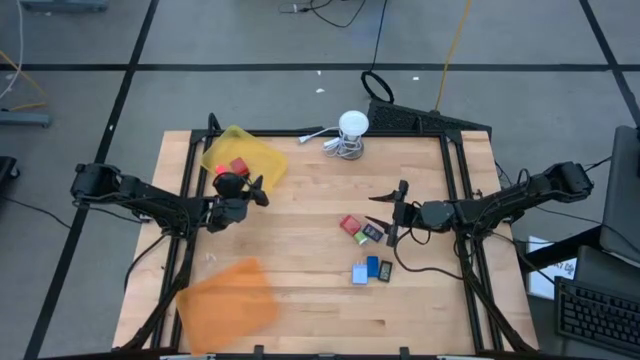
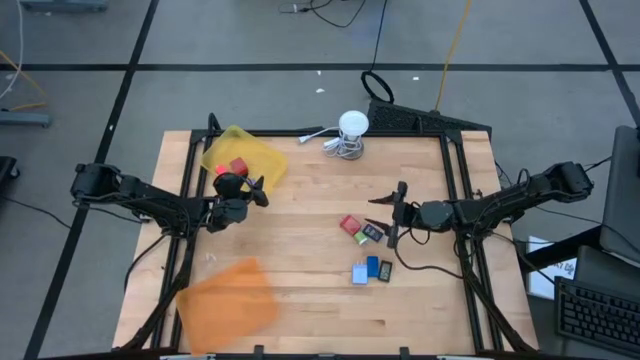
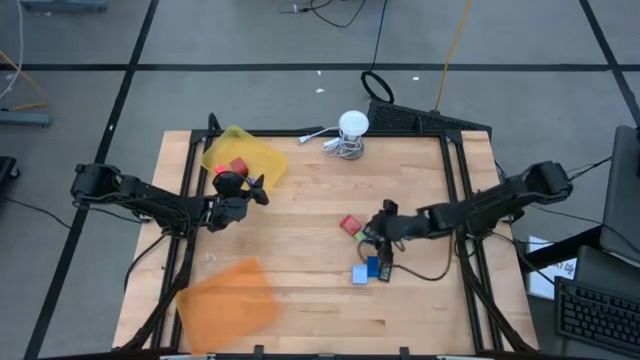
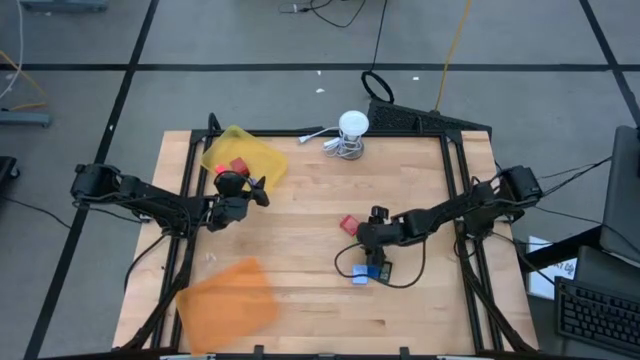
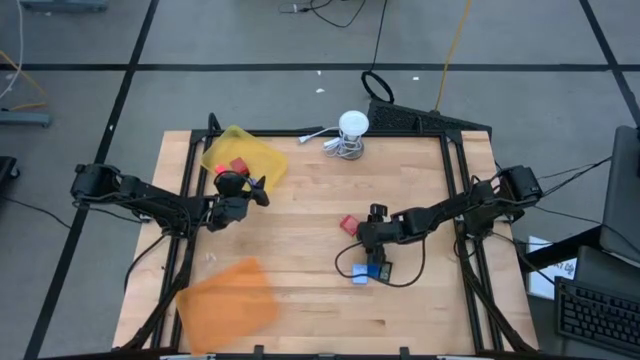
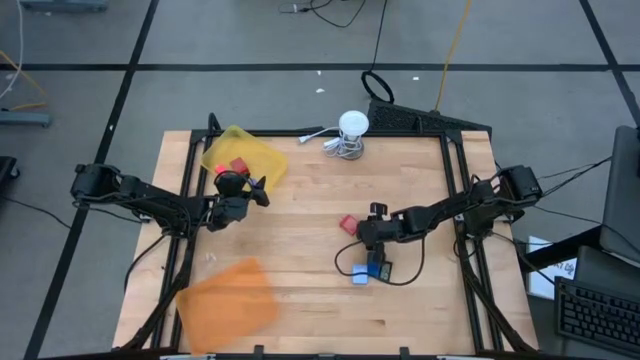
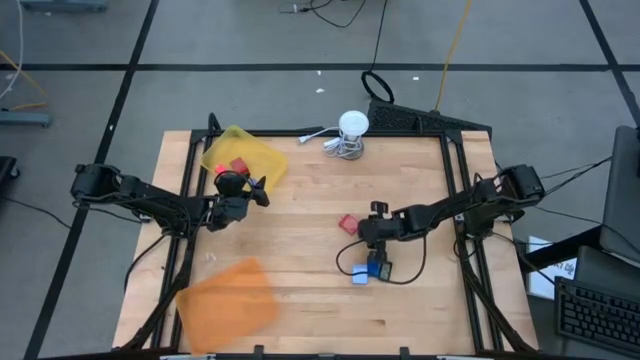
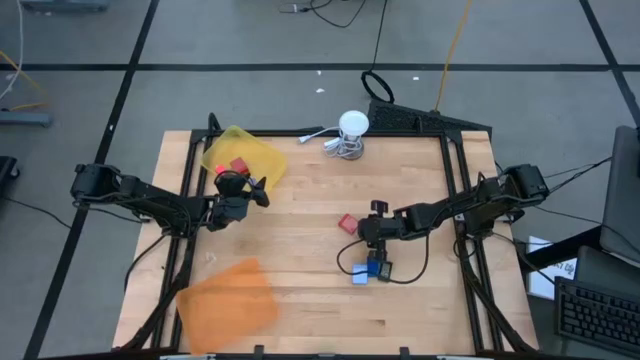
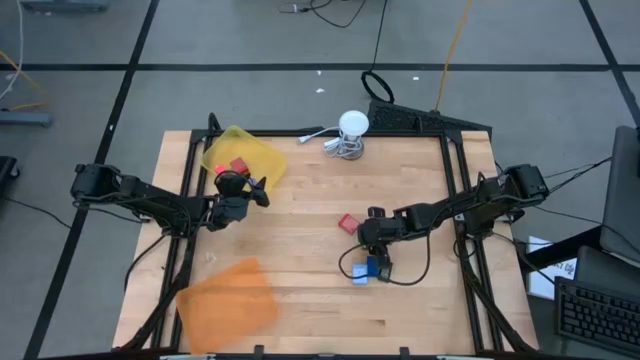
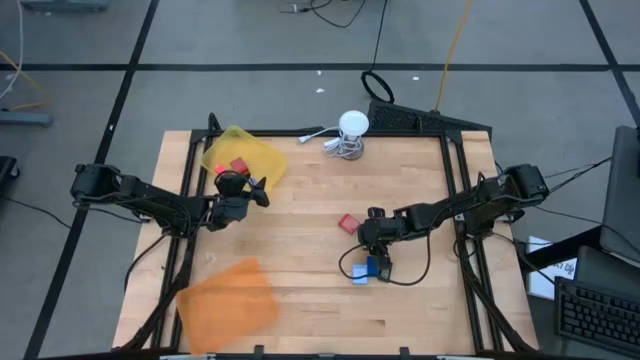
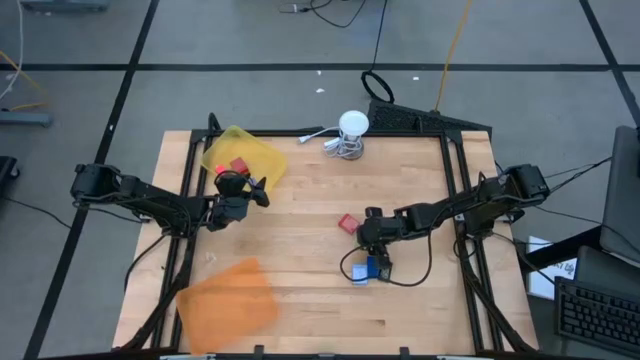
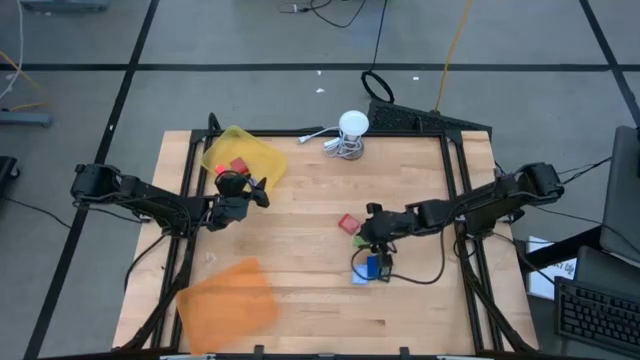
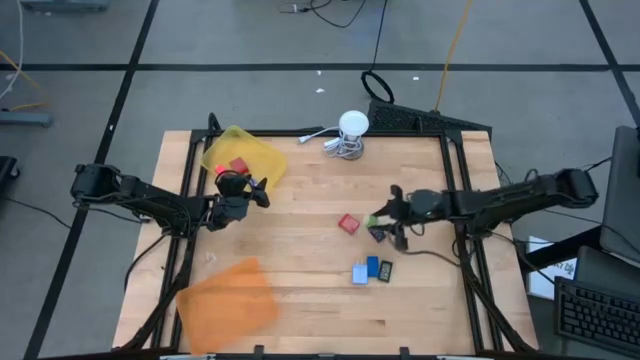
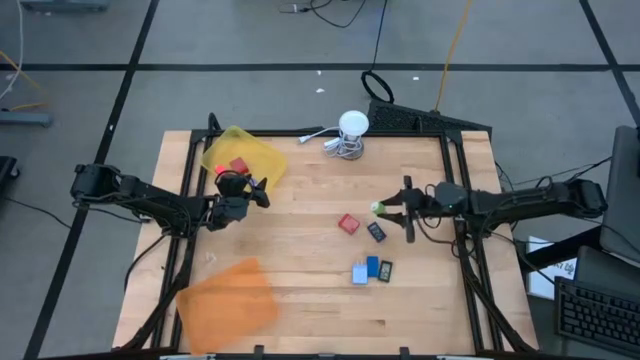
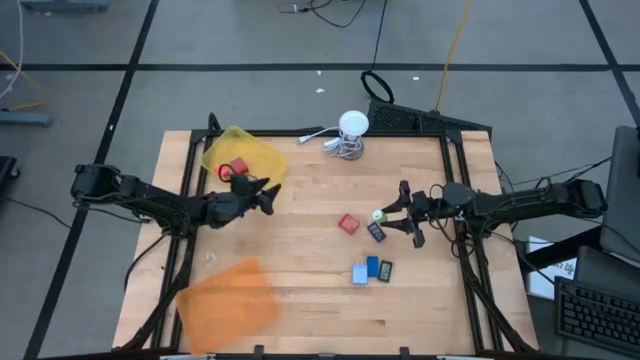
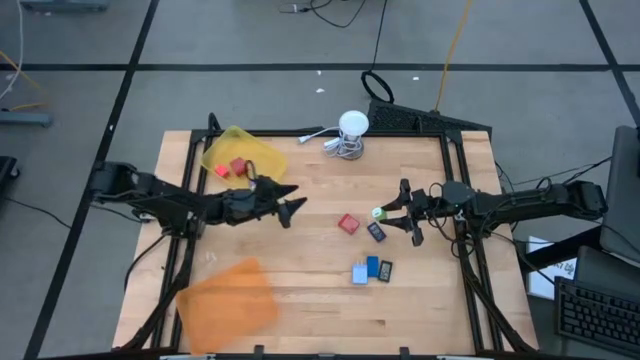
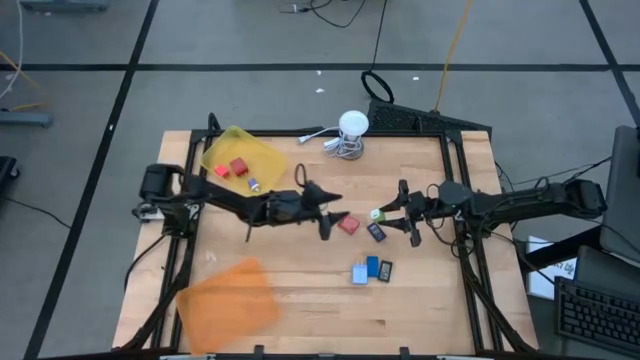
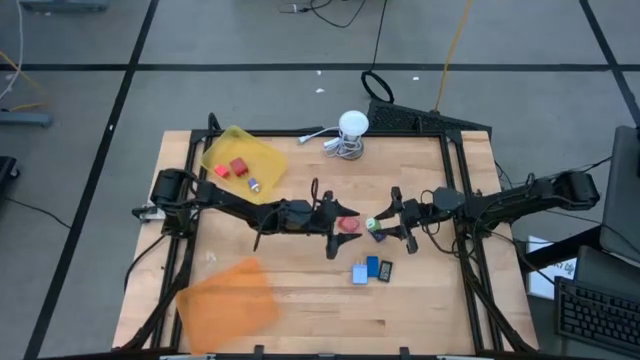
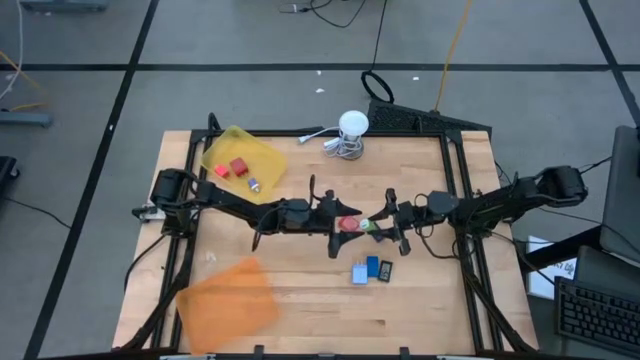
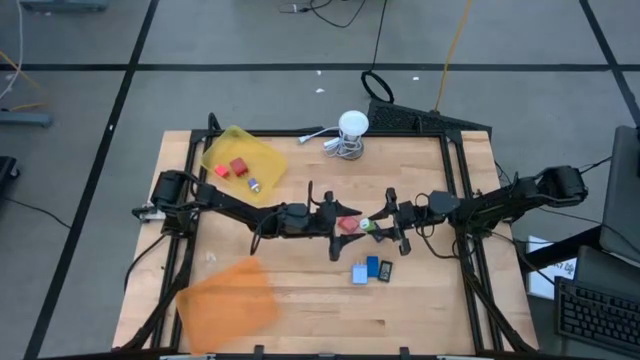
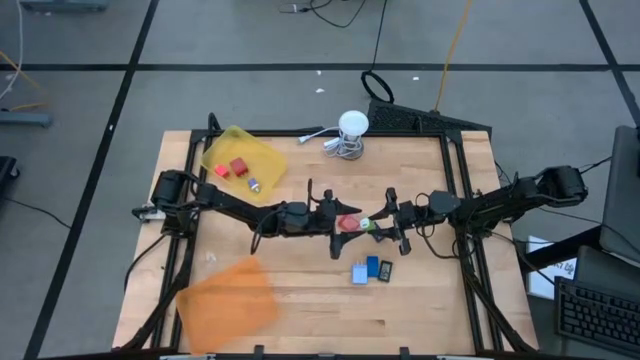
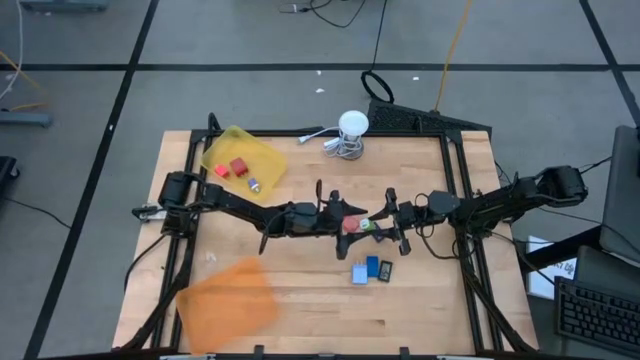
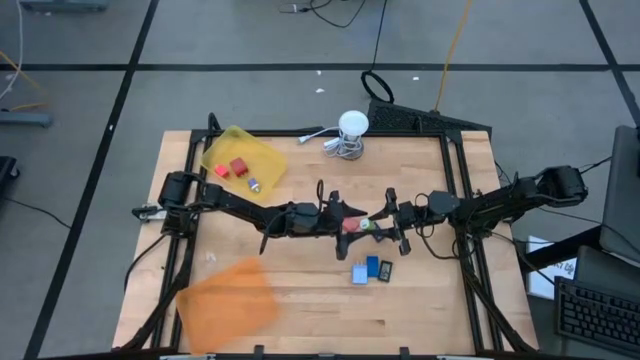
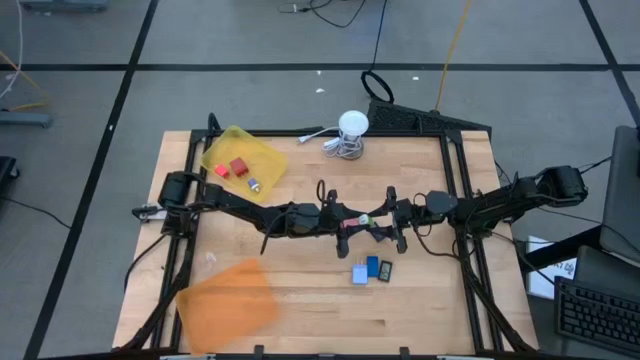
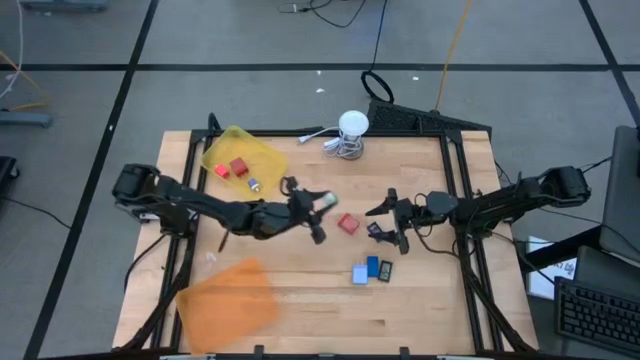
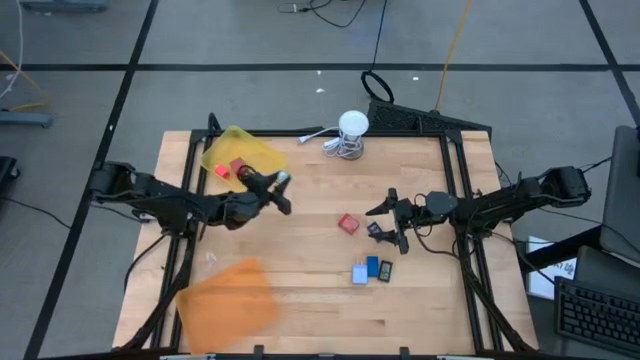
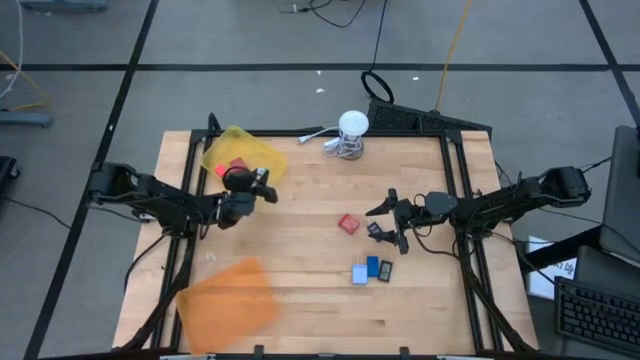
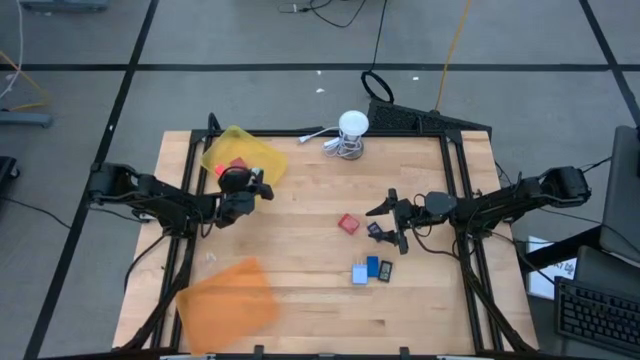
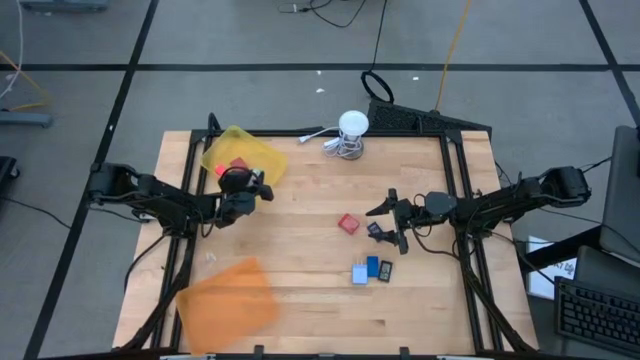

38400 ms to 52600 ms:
Task: Pick & Place Office items
Put the green charger adapter into the yellow bin
